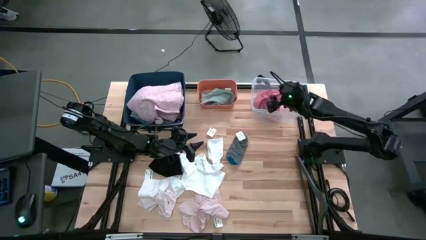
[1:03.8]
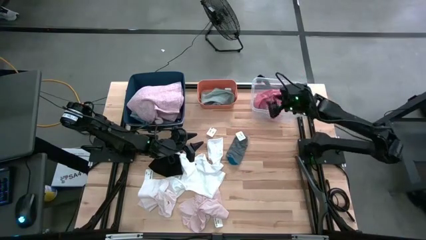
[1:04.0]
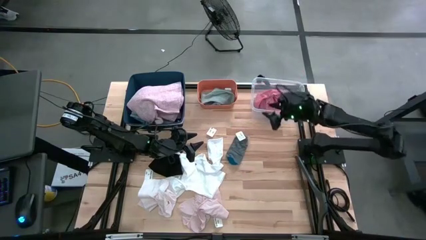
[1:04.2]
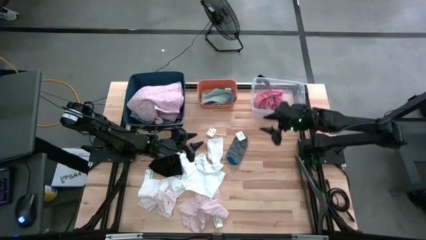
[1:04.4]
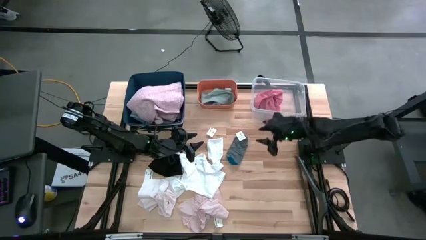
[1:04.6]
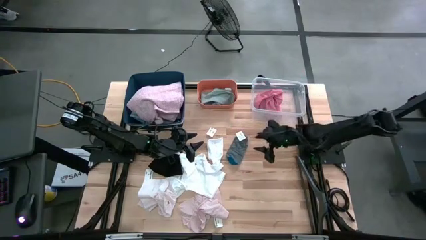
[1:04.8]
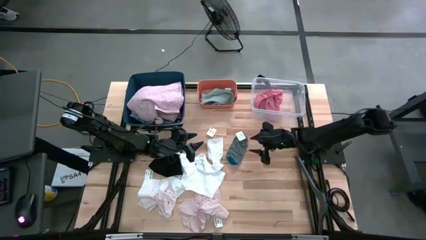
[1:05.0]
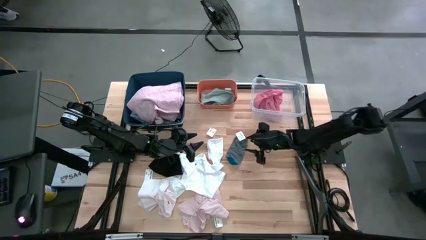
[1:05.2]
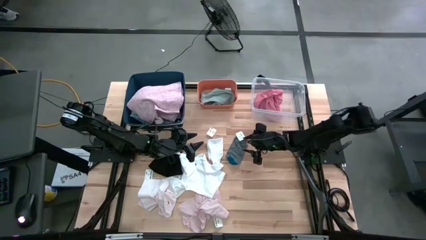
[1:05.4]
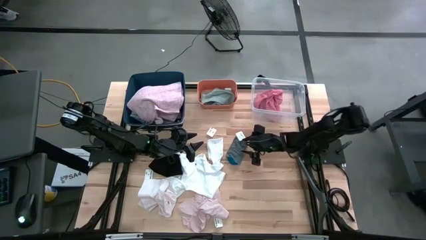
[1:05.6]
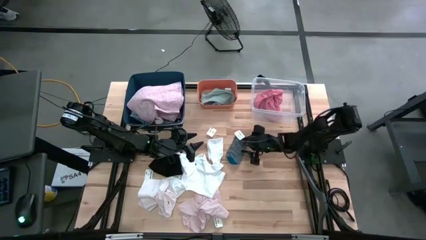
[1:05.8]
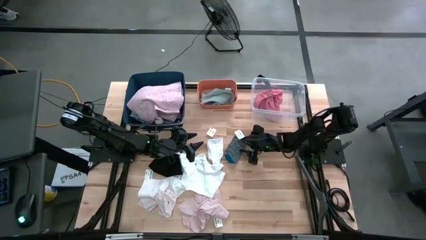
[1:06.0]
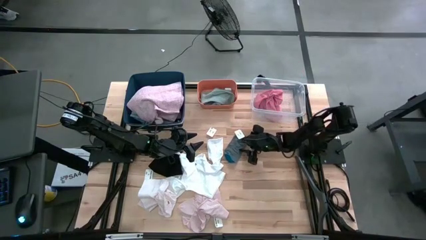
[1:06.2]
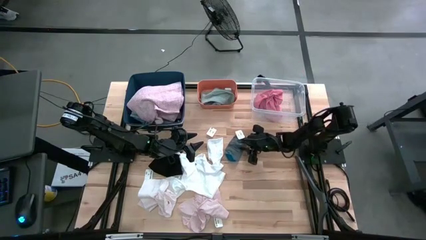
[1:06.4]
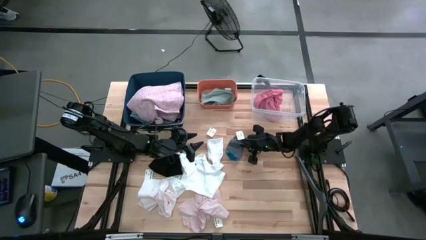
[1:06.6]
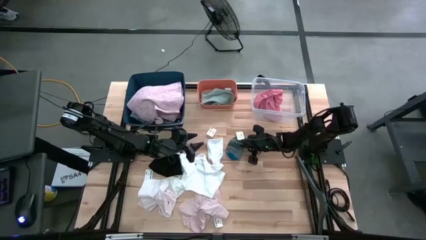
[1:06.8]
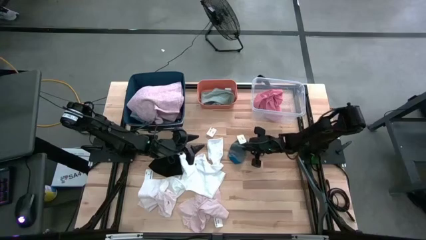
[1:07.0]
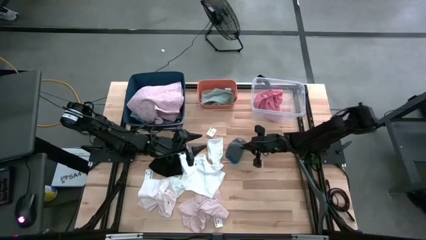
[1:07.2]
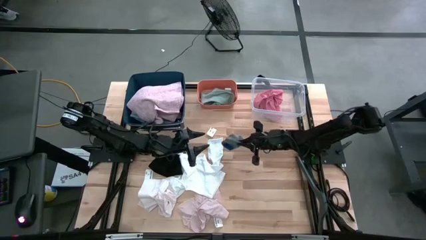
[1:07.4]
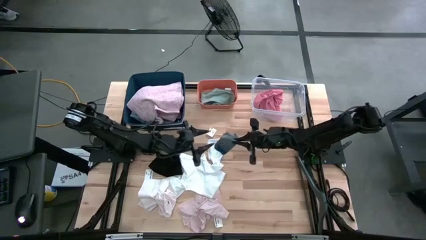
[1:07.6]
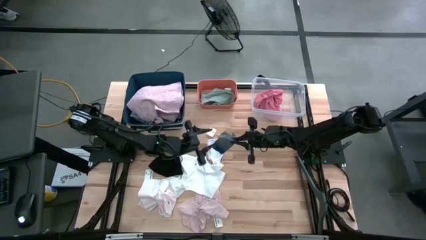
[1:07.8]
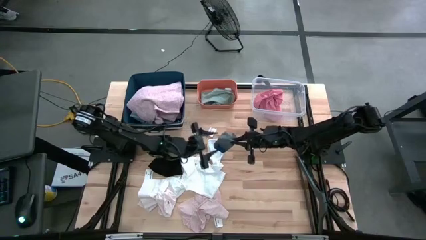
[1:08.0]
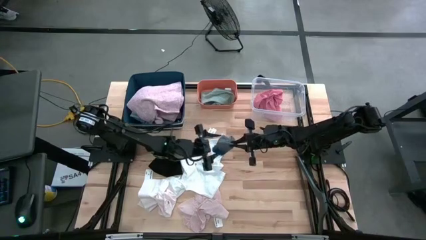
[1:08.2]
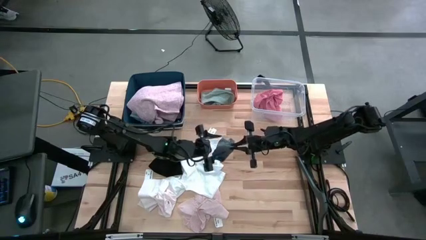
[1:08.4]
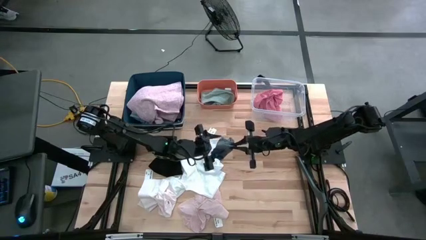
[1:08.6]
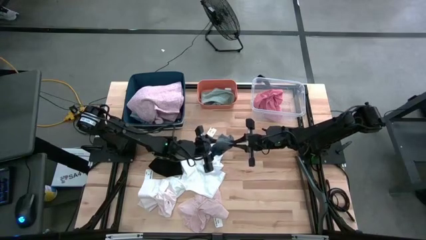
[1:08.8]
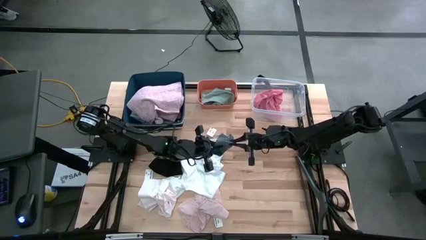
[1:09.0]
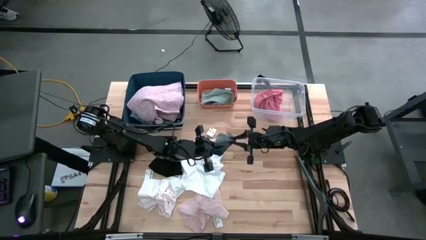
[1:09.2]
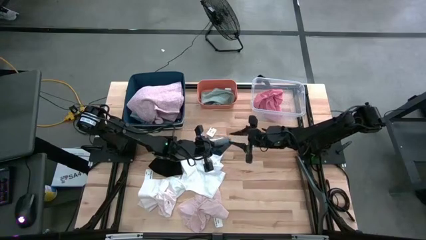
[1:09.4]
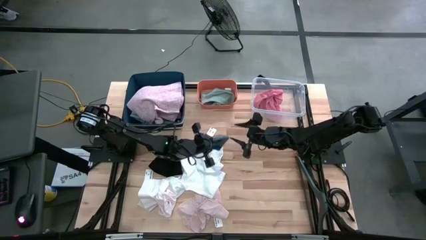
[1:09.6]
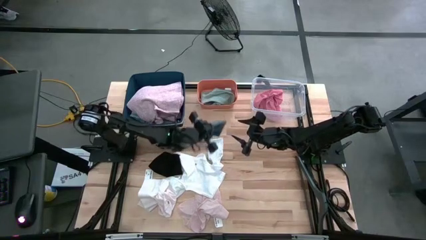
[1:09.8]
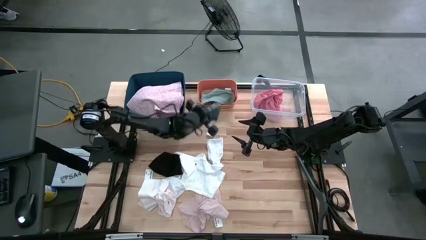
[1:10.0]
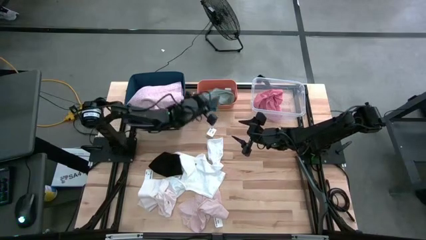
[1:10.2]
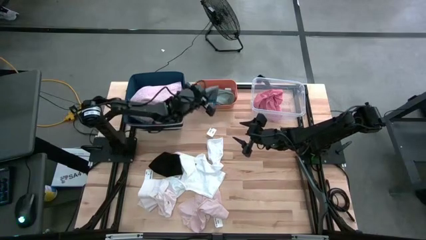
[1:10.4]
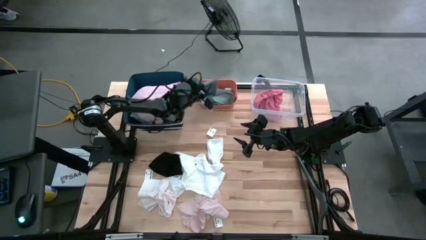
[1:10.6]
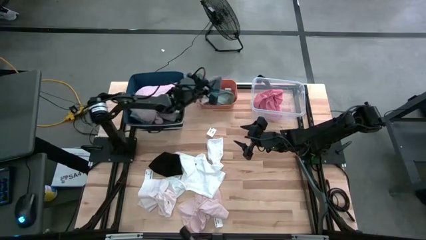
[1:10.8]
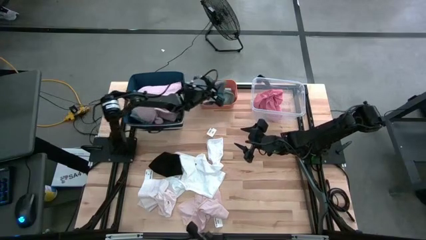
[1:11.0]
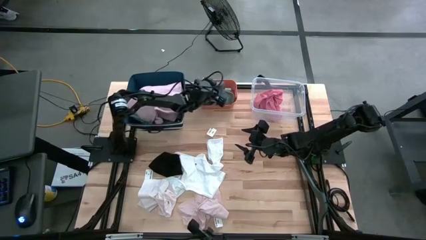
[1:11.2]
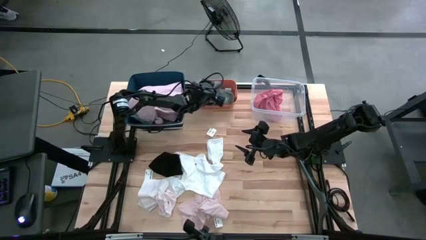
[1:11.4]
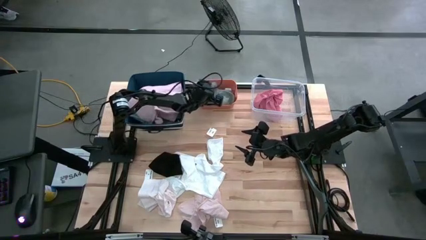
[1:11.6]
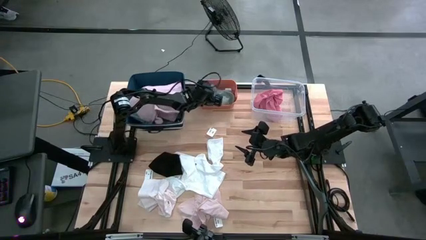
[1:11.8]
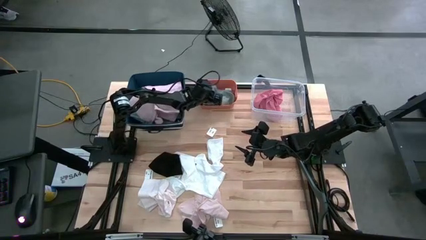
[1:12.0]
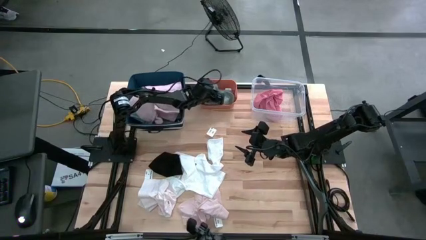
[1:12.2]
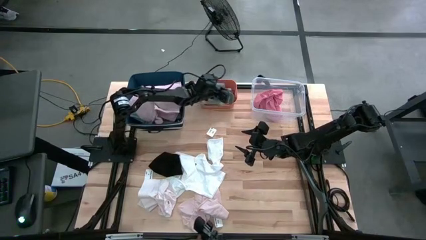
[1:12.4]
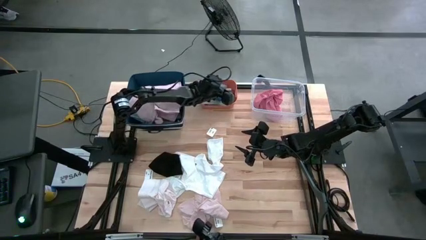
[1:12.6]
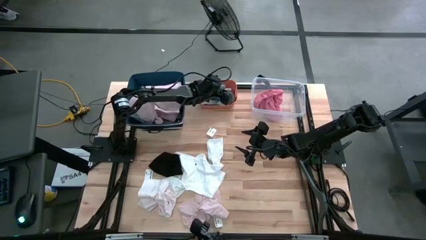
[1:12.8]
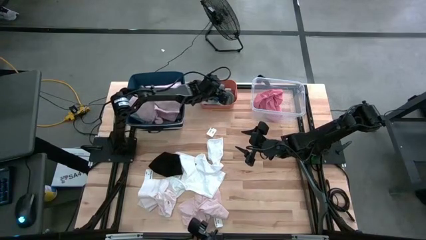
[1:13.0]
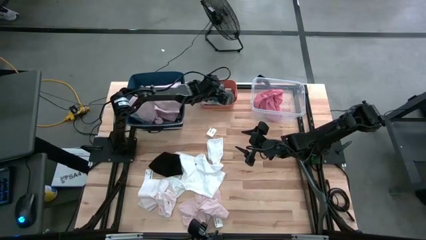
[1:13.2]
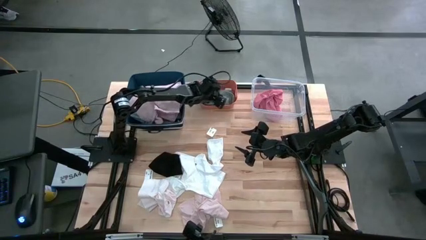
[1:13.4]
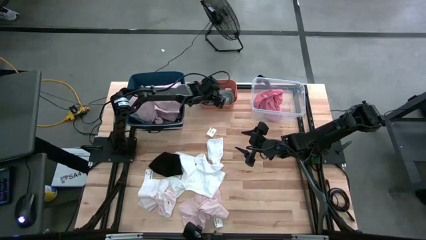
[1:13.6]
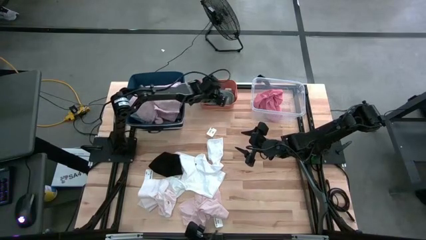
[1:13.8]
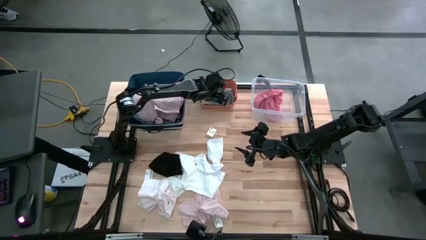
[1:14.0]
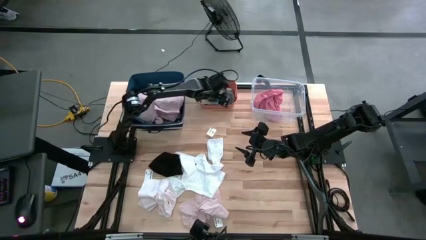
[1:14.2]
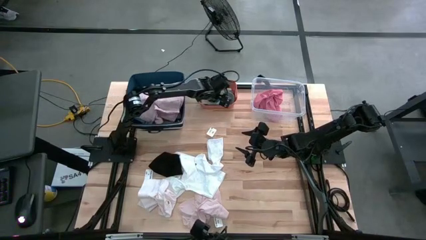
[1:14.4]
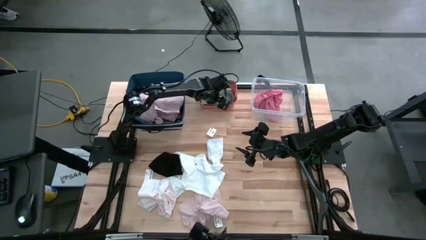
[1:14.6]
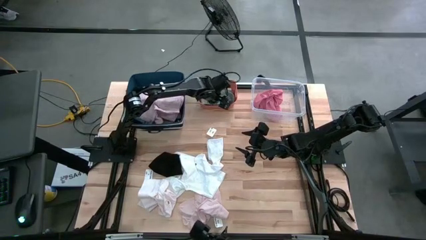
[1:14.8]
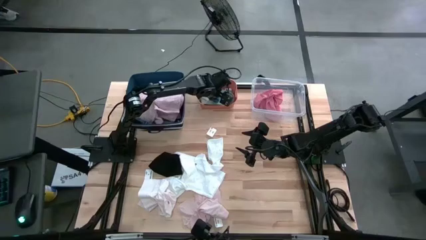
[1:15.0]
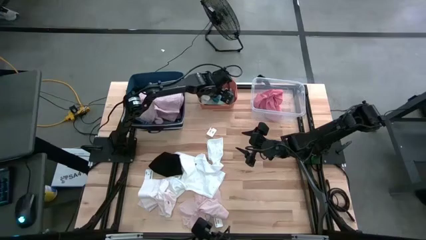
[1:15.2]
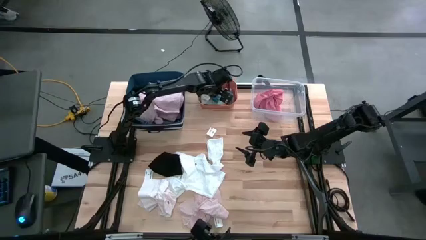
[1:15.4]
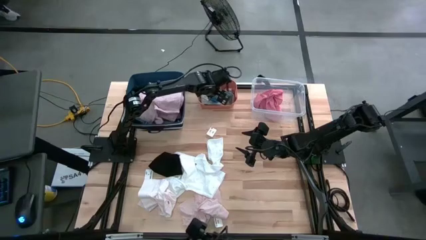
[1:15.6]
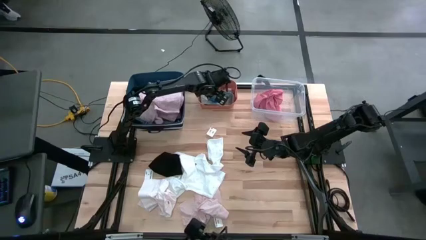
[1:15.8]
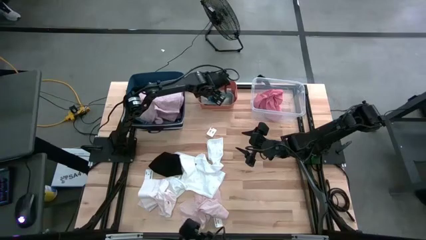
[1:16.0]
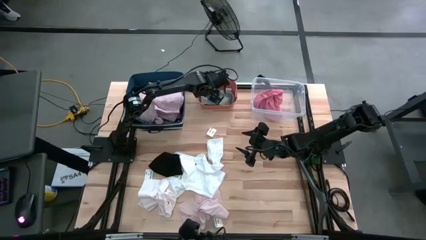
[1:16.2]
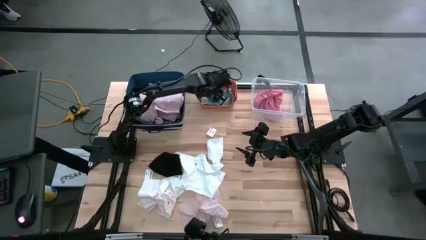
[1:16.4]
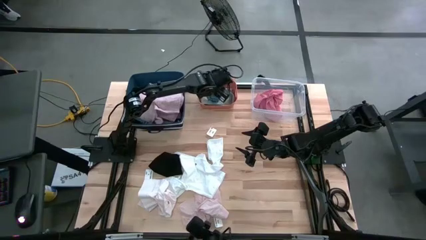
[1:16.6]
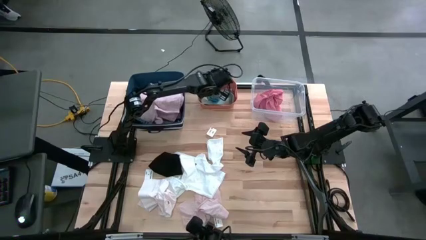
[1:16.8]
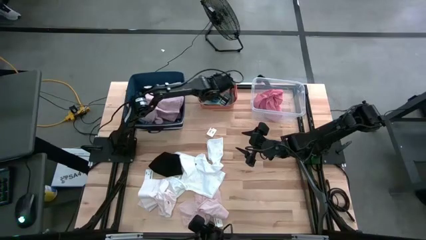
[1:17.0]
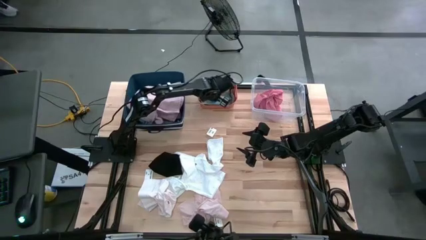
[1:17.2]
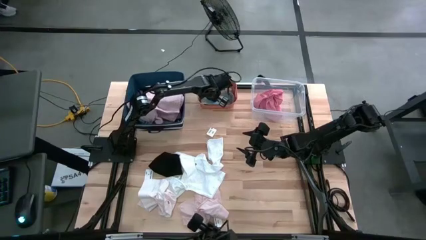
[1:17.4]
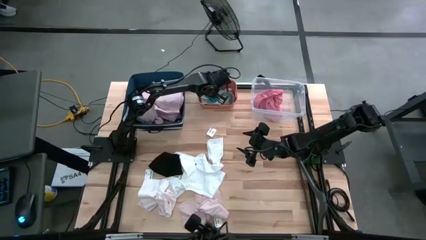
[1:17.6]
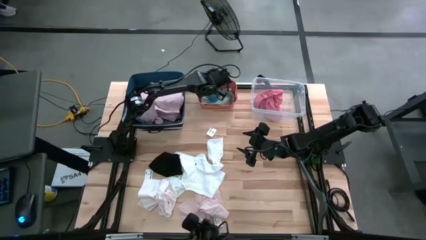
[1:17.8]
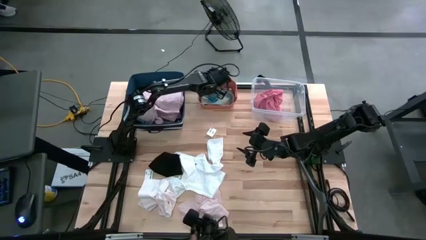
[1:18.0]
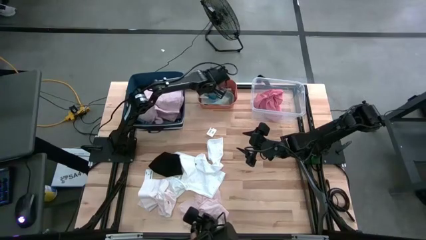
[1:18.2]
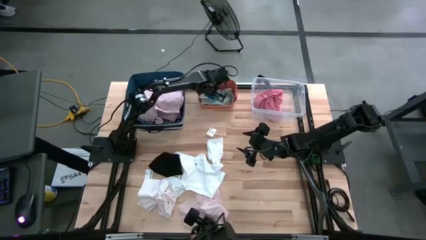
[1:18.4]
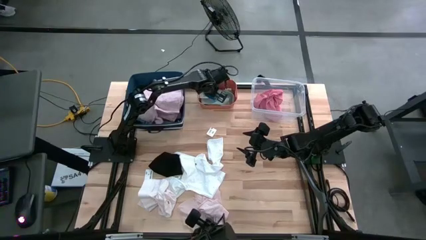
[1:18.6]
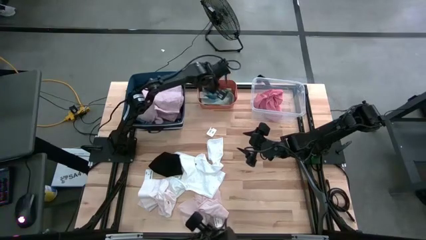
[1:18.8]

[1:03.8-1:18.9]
Task: Pick & Place Cloths
Put the blue and gray sock into the orange bin
